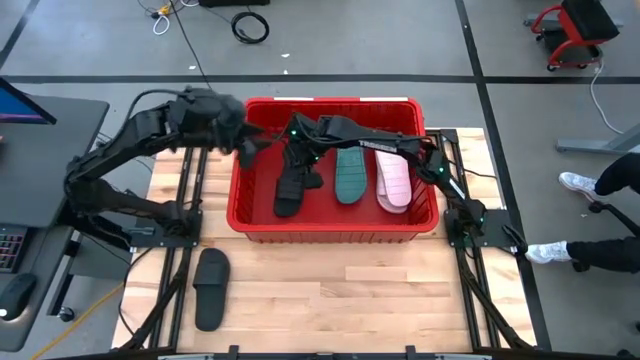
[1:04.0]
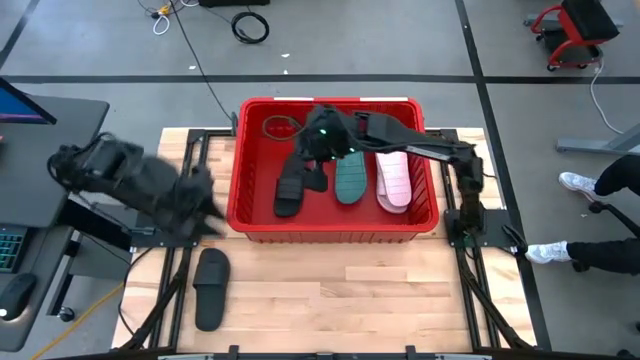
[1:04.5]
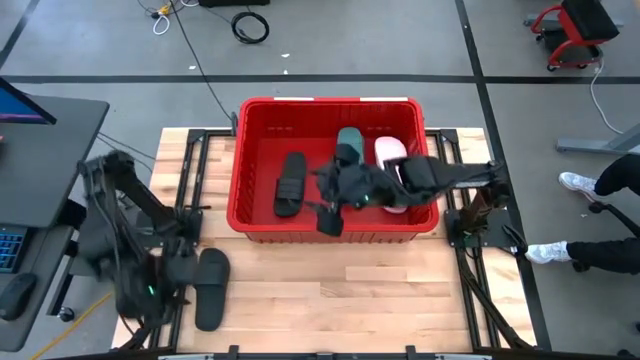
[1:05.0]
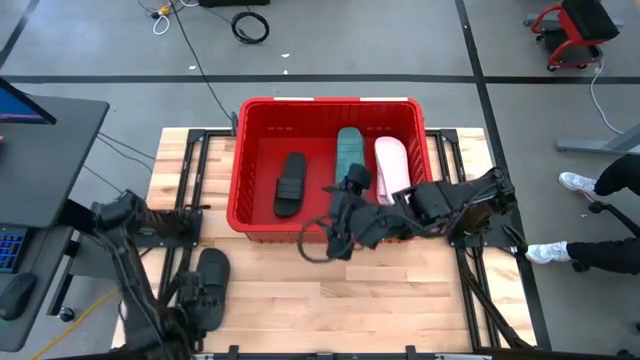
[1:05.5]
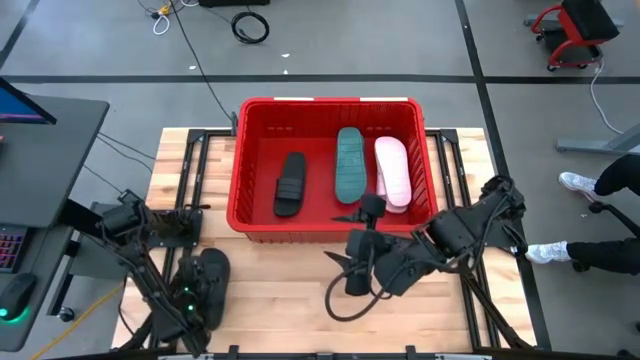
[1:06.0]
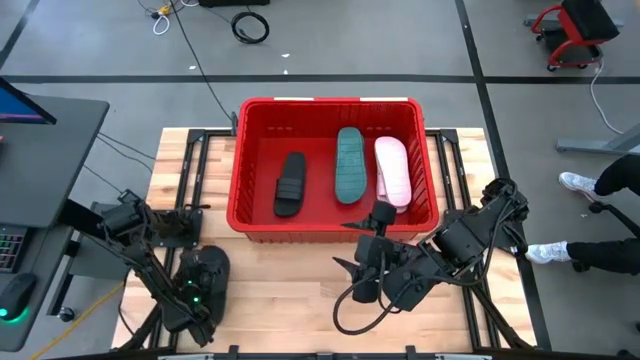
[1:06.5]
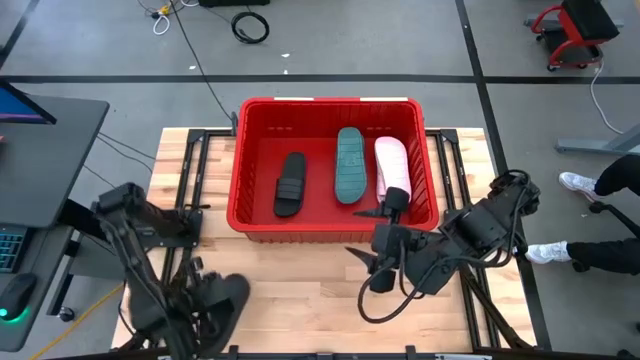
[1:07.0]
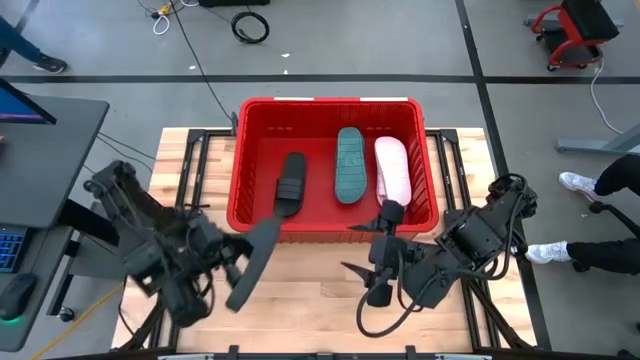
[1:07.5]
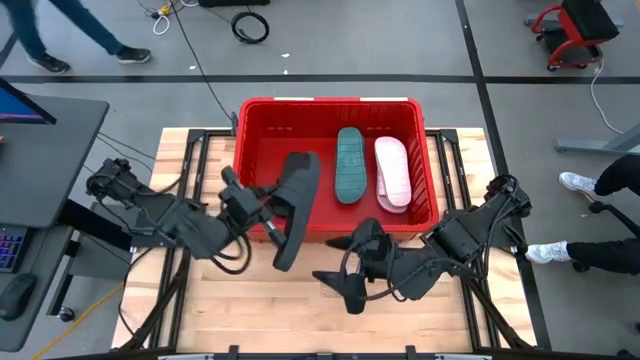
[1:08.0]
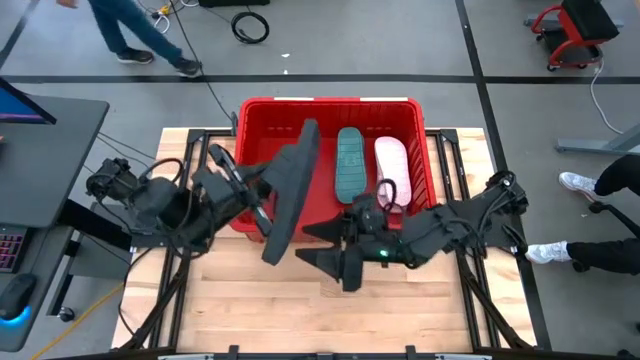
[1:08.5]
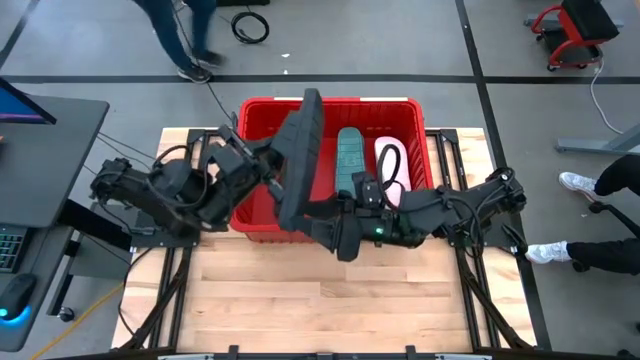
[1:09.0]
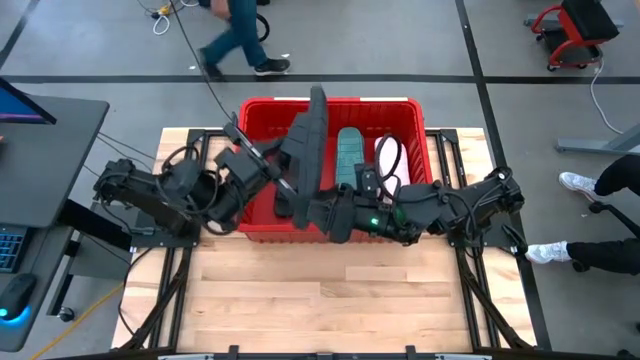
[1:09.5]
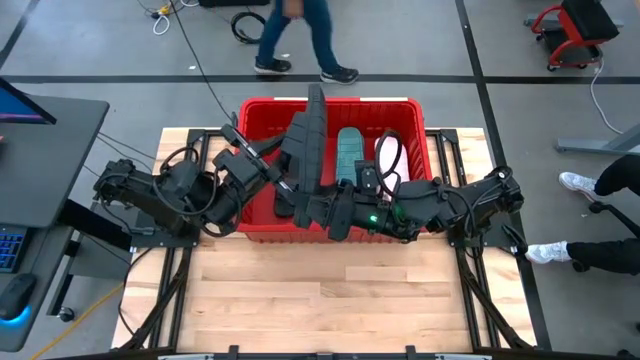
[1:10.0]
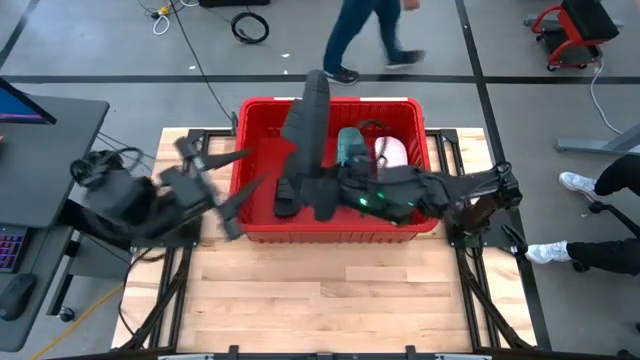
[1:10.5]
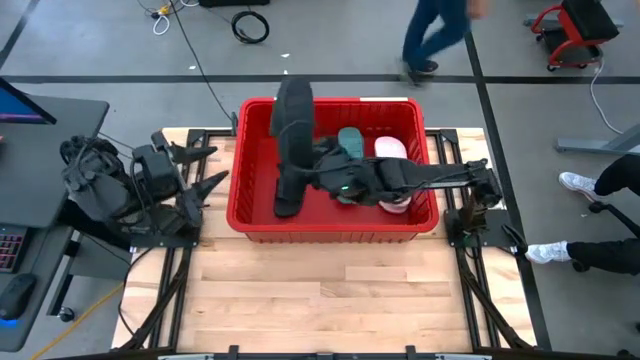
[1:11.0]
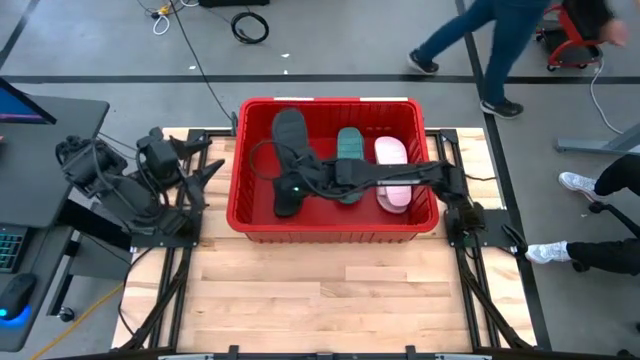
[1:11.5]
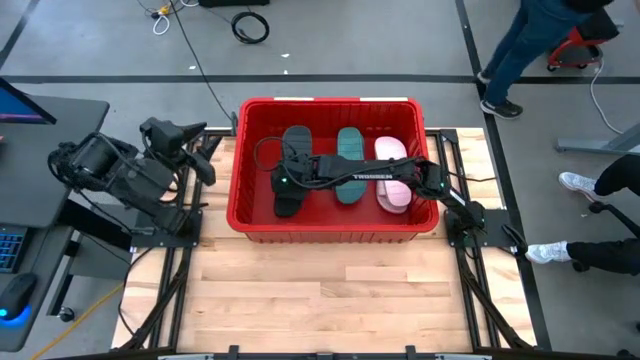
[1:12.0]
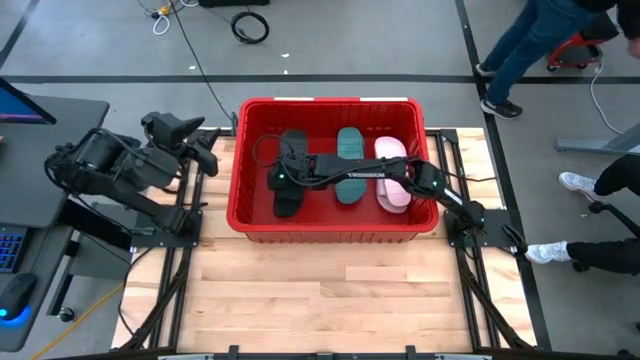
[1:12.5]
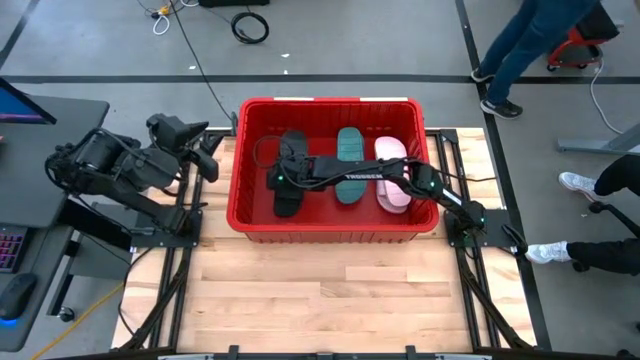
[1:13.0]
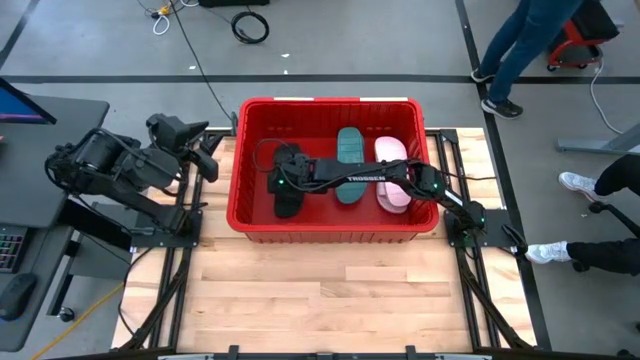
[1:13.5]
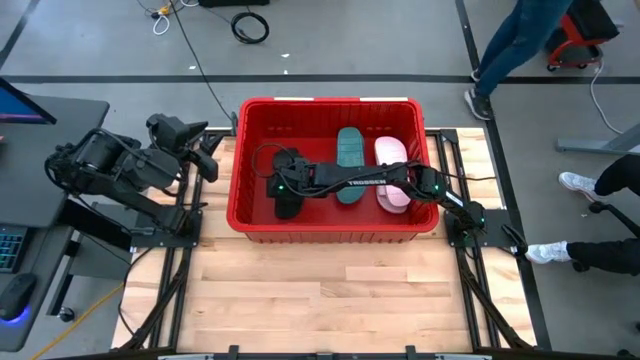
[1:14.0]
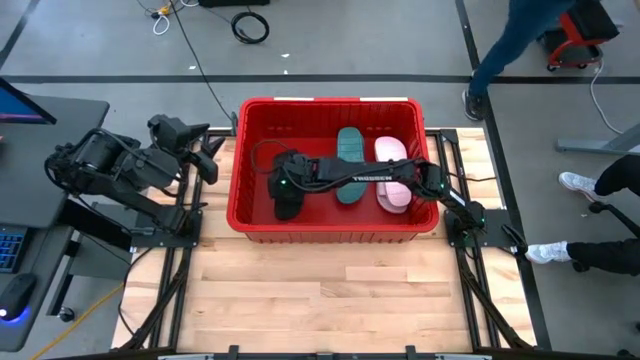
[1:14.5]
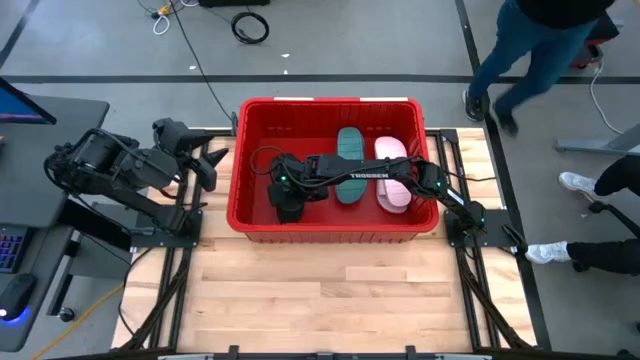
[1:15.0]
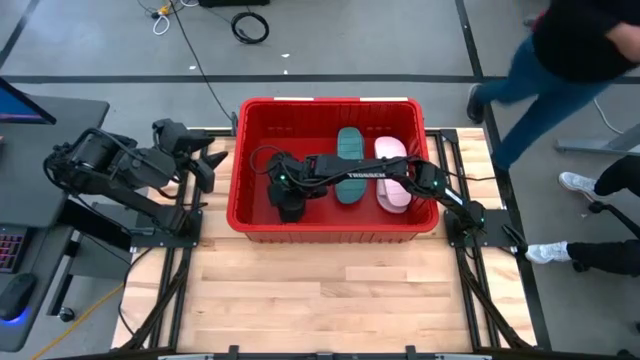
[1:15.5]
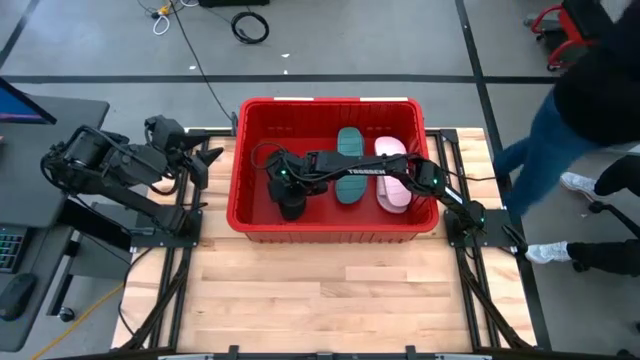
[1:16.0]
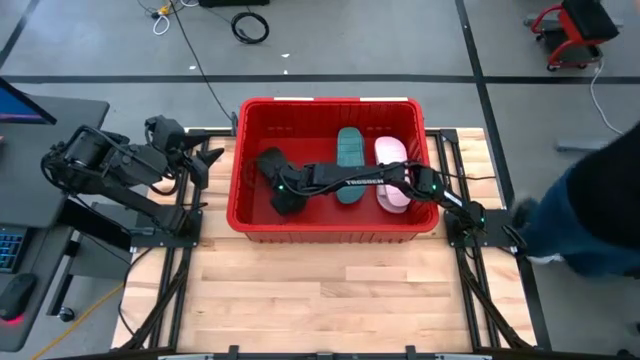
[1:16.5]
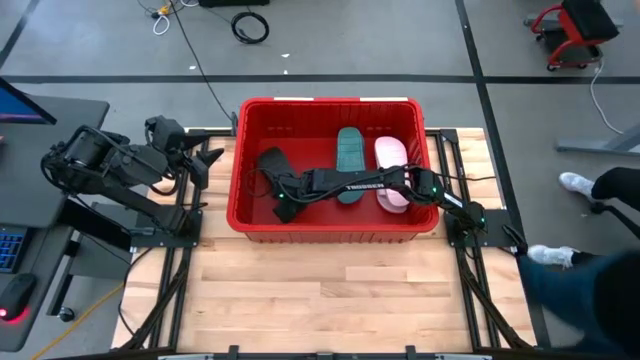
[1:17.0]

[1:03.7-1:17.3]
Task: Pick and place slides into bin
Stack the black slipper on top of the other black slipper in the red bin

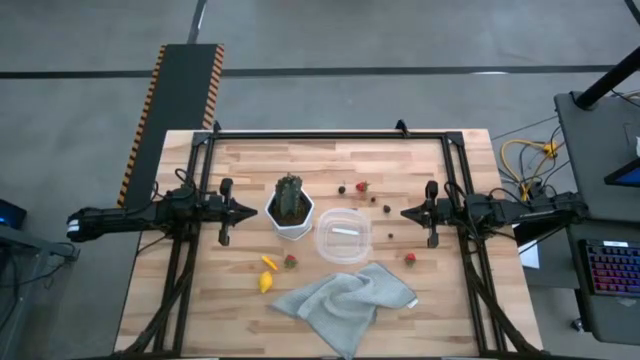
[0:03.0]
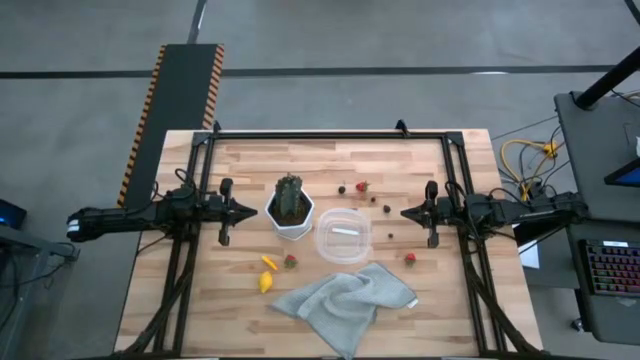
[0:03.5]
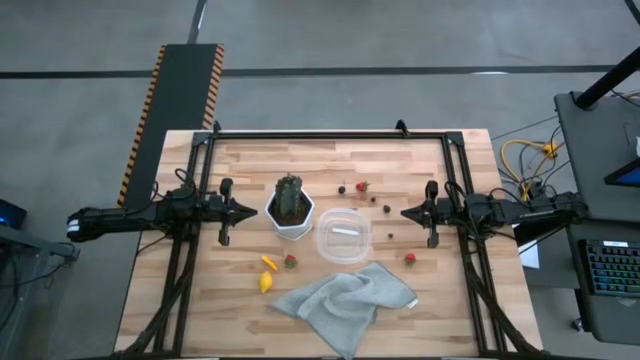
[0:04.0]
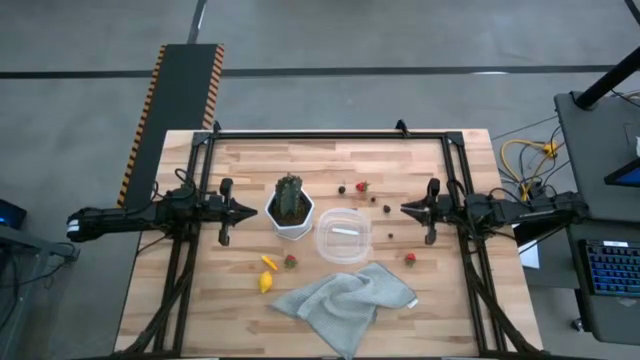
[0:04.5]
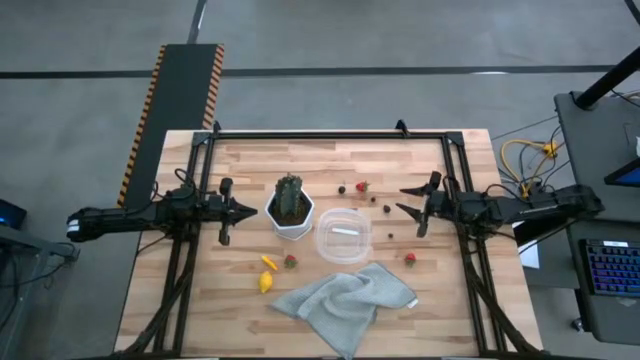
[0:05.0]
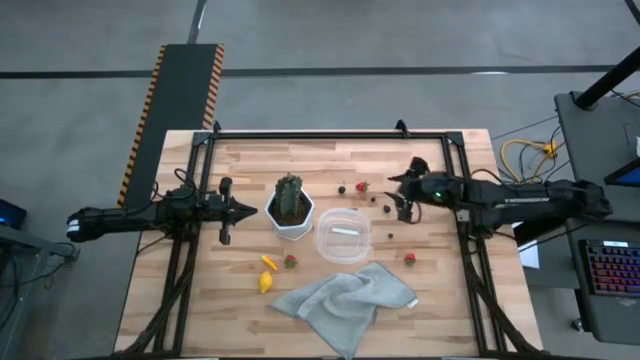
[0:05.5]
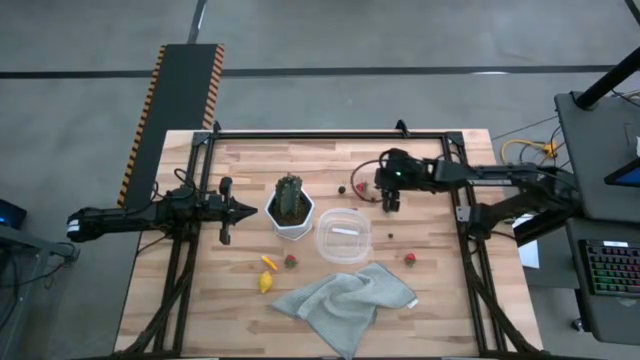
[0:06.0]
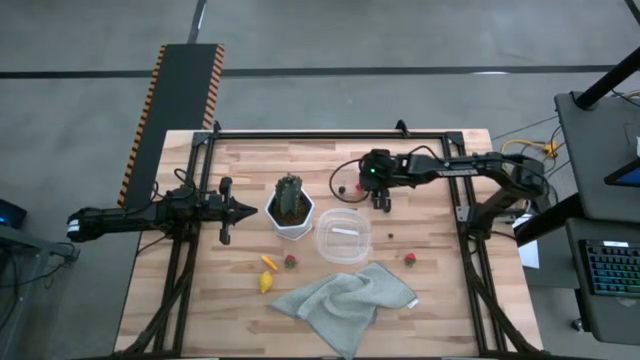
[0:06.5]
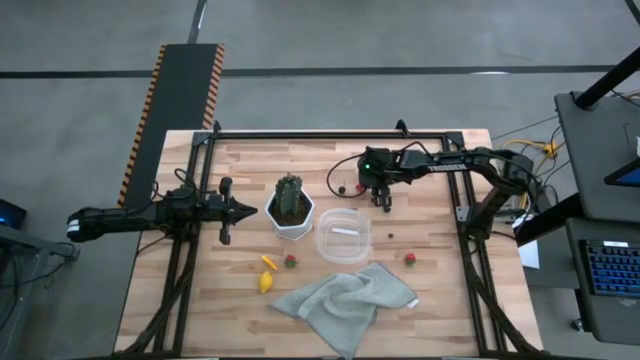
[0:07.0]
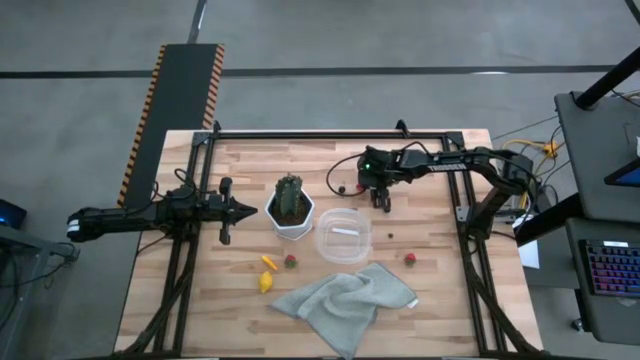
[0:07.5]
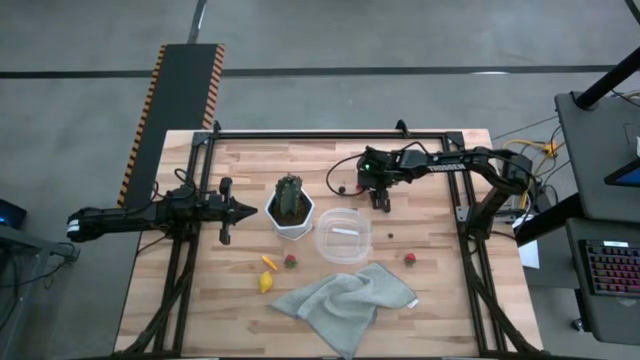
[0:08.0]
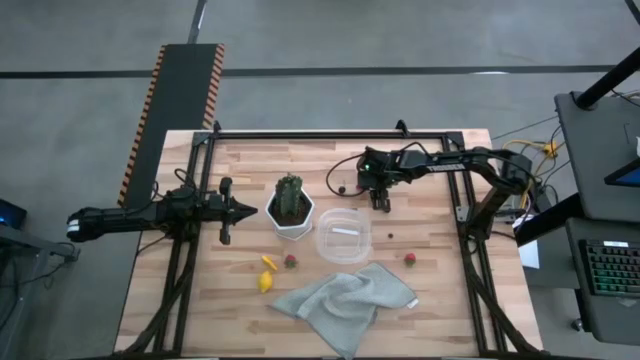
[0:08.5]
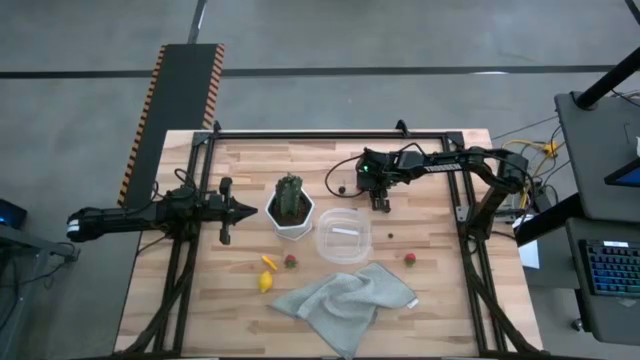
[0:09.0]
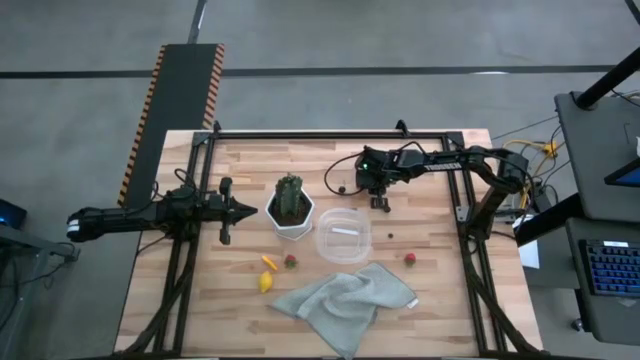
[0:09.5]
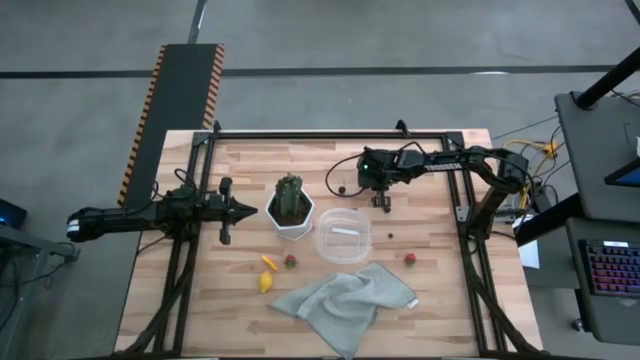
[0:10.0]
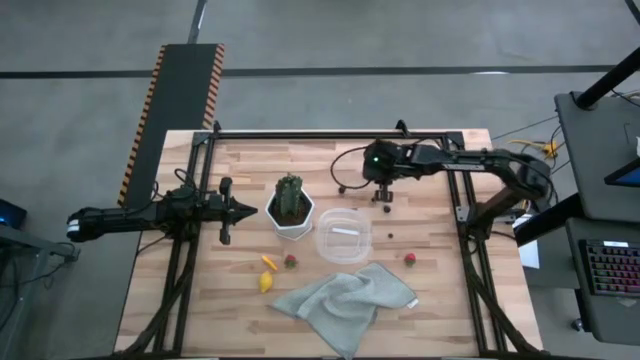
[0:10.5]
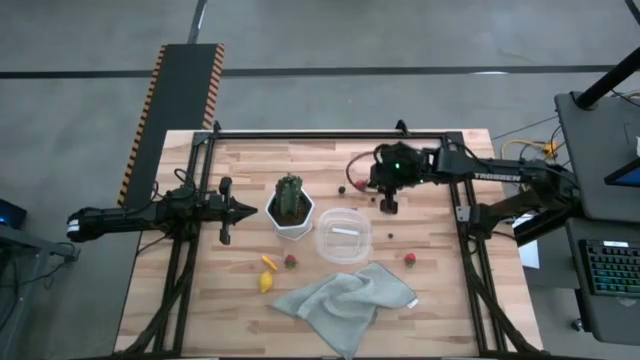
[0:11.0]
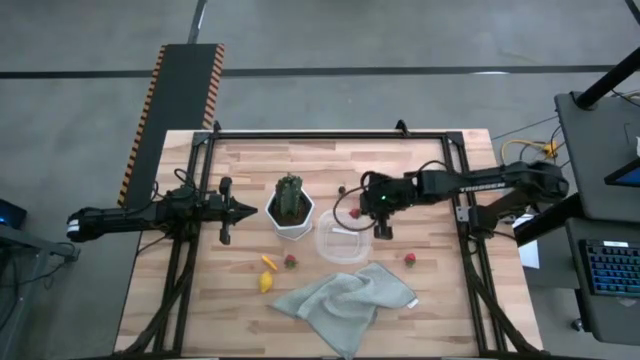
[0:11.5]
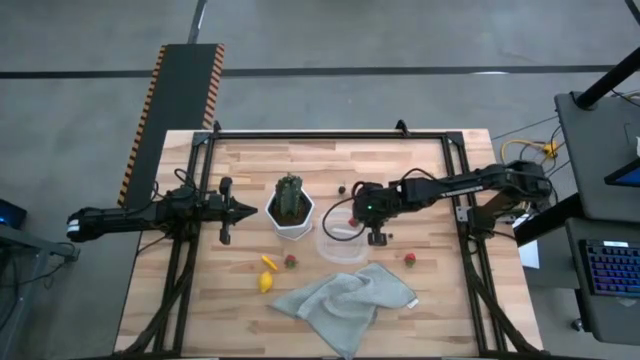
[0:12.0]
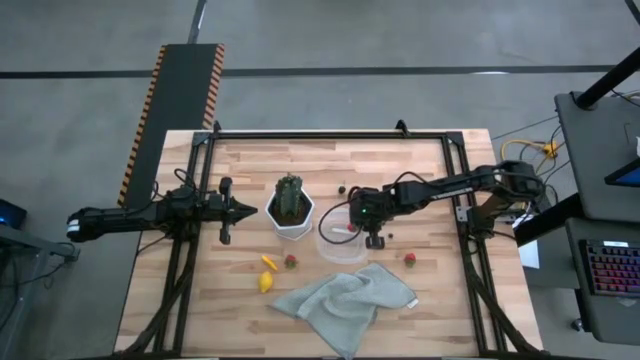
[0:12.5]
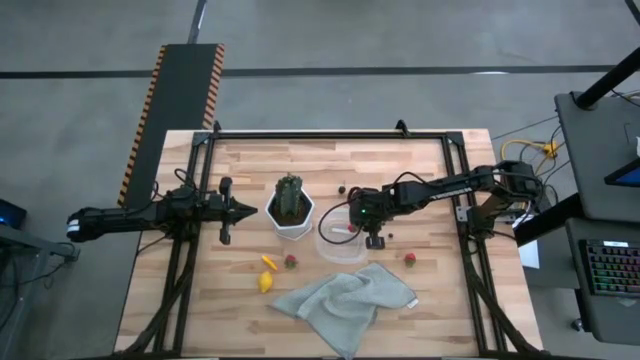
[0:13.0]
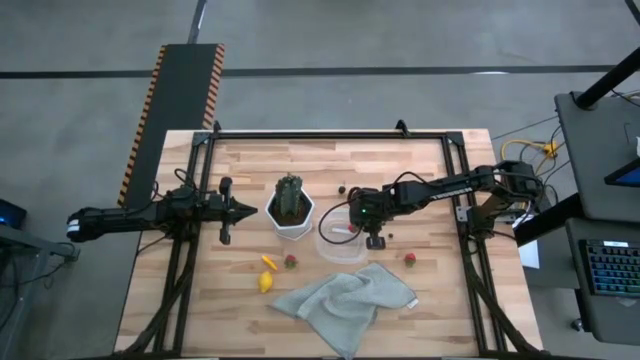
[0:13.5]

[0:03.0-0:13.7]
Task: Pick and placing Produce into tupperware
Put the top strawberry into the transparent bin
